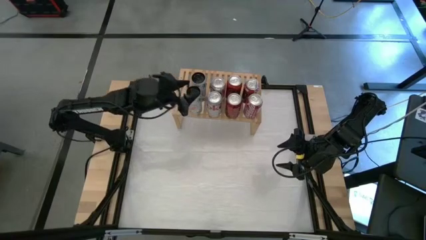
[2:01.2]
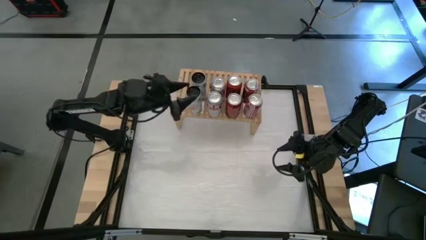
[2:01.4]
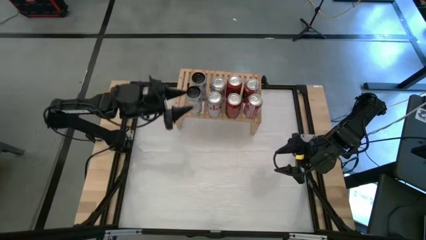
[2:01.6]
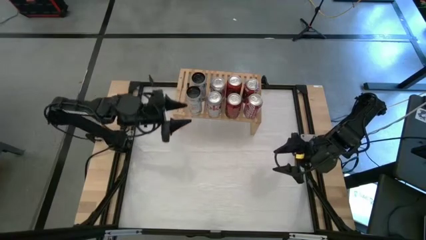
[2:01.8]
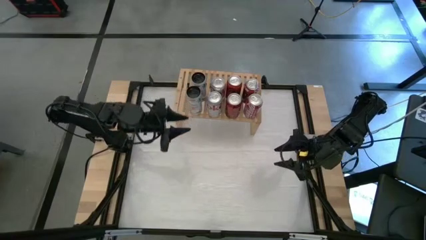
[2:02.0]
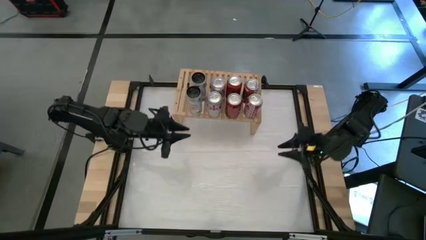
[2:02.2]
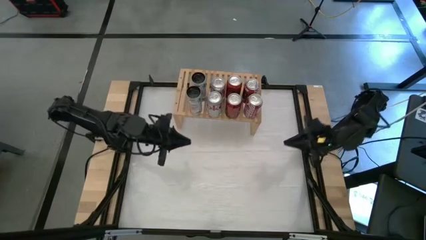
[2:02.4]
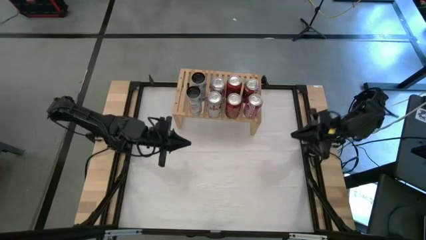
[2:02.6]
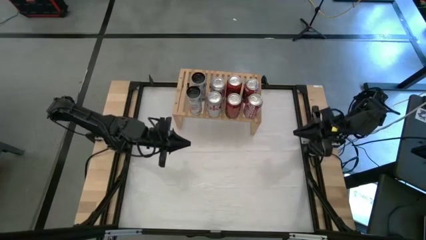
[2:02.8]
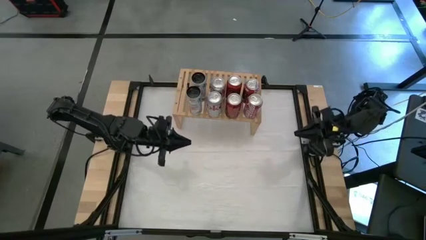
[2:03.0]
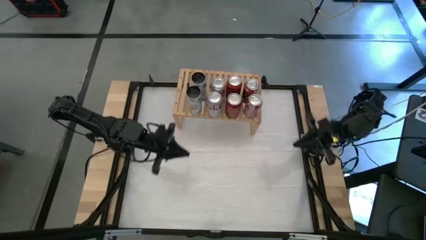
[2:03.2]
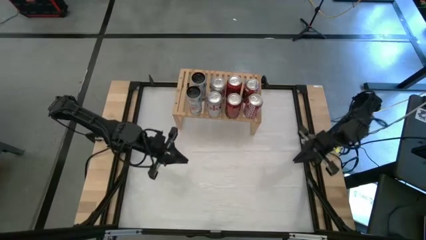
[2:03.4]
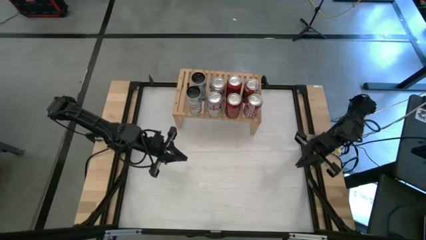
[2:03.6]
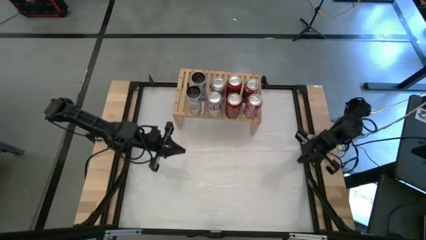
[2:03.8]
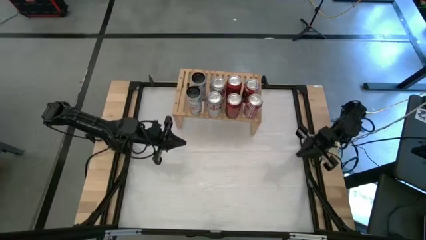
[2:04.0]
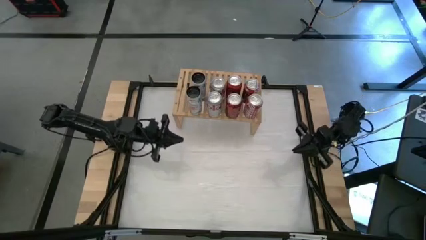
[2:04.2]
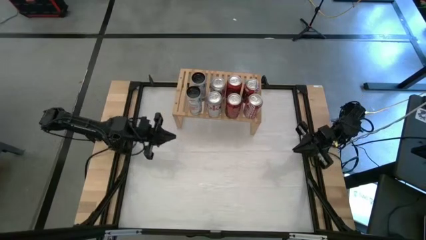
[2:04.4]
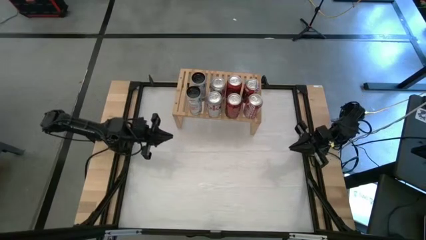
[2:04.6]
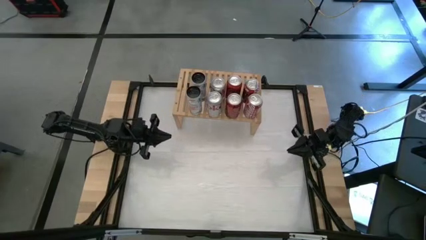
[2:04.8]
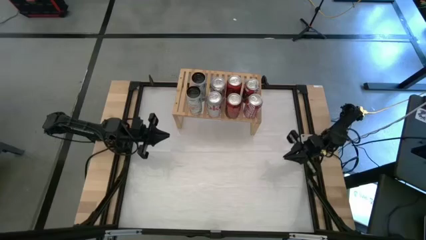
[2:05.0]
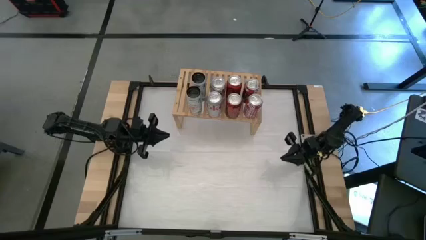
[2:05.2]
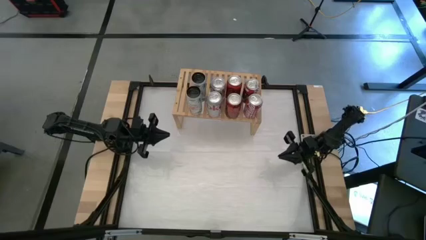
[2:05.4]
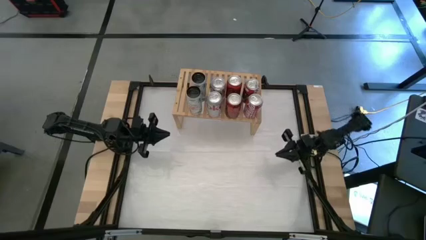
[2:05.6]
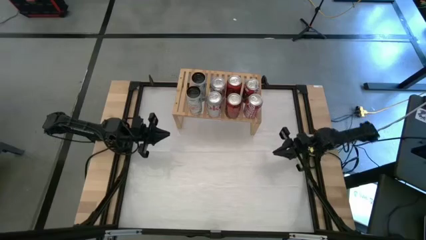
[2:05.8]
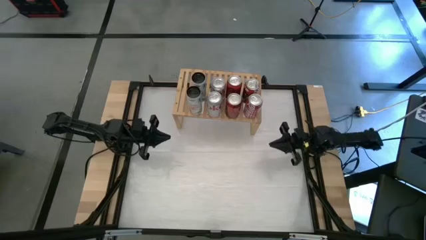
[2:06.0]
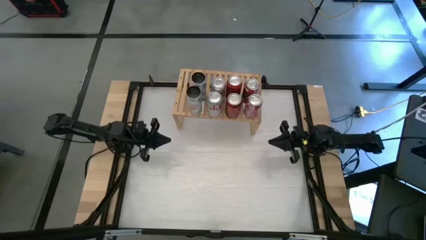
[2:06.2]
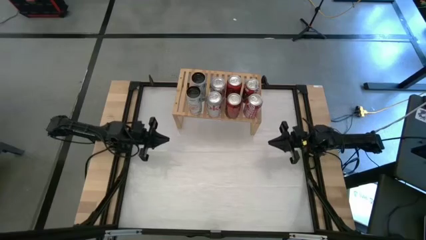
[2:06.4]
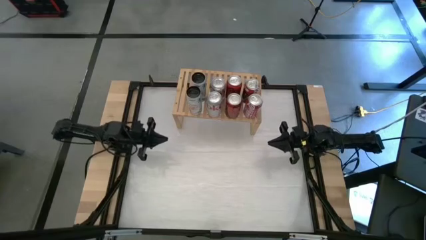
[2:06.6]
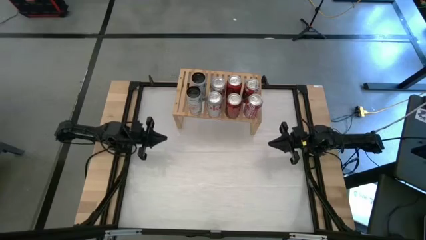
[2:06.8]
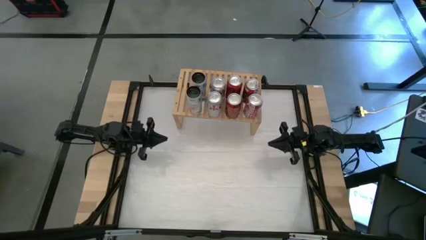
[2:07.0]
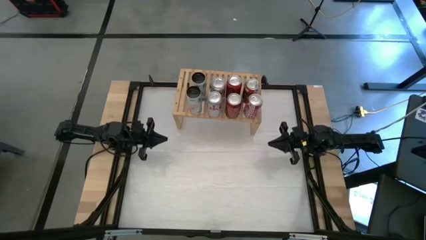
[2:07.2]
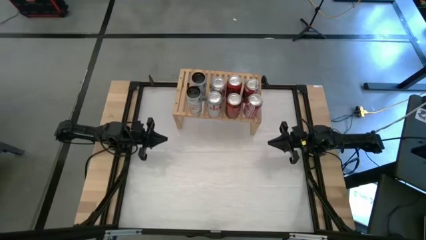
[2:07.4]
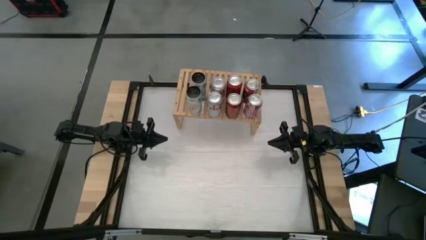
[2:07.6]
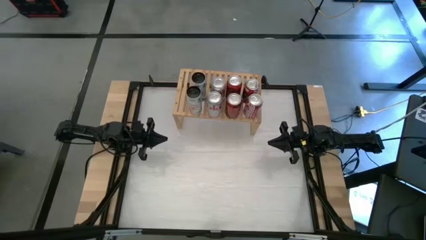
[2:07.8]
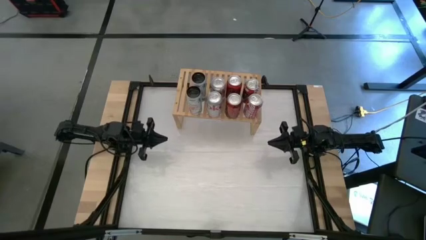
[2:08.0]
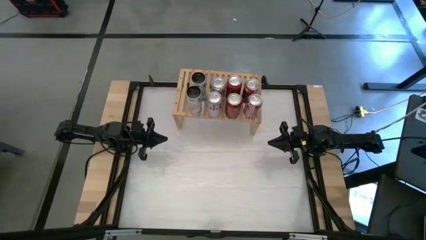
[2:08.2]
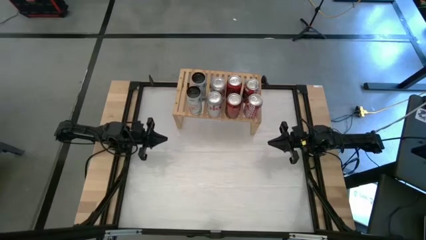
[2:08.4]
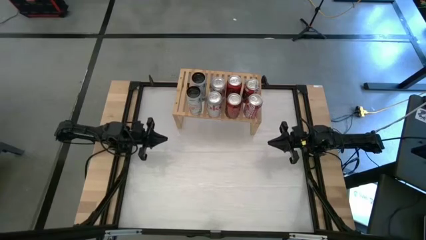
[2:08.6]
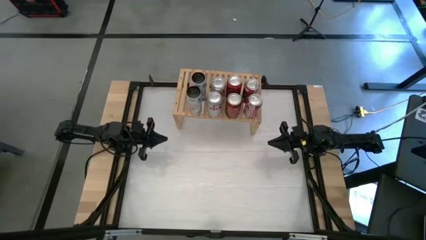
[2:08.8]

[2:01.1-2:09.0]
Task: Place canned beverage on shelf
Return to Home Position

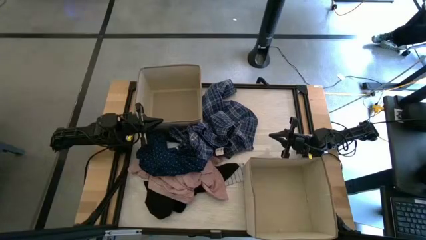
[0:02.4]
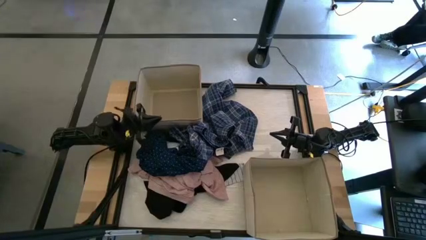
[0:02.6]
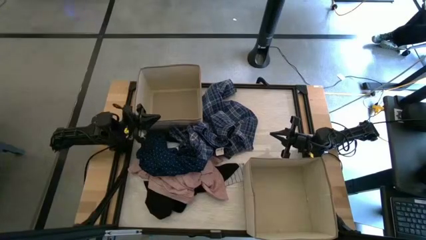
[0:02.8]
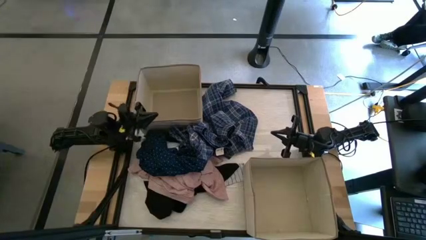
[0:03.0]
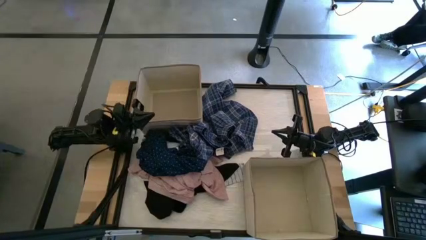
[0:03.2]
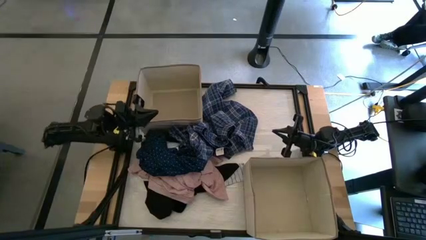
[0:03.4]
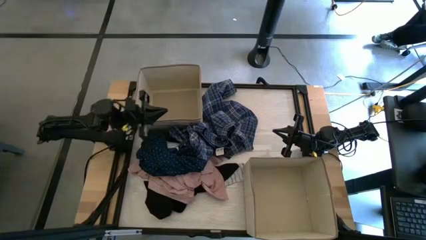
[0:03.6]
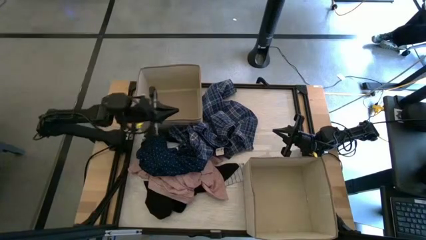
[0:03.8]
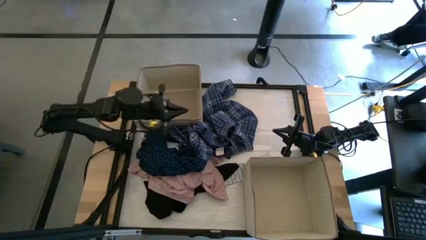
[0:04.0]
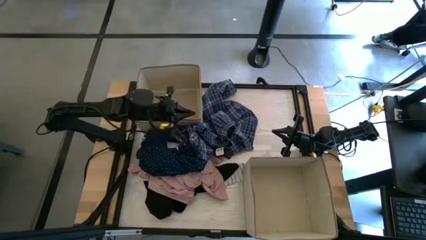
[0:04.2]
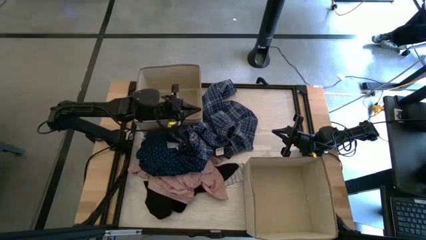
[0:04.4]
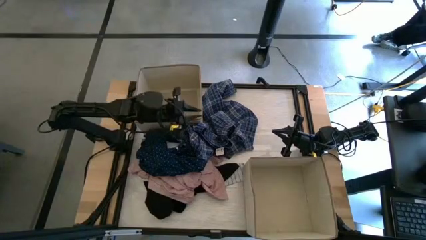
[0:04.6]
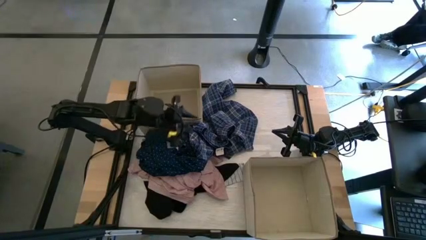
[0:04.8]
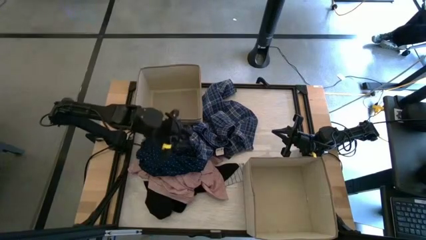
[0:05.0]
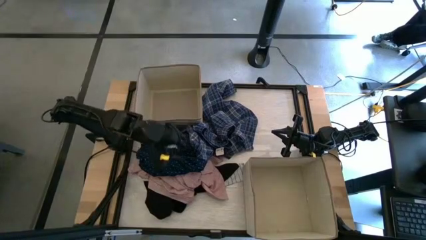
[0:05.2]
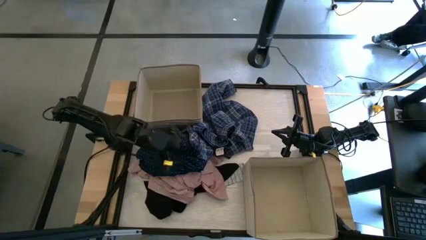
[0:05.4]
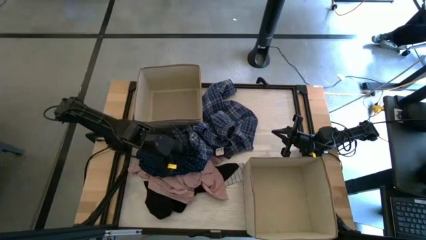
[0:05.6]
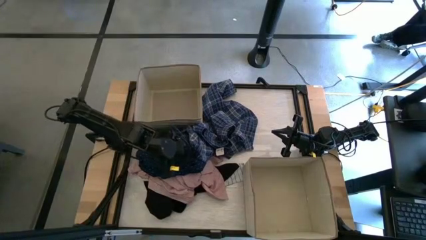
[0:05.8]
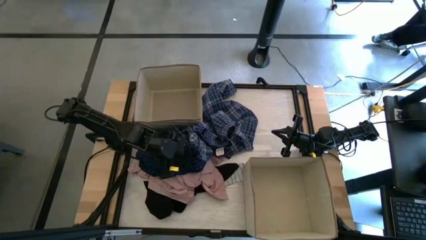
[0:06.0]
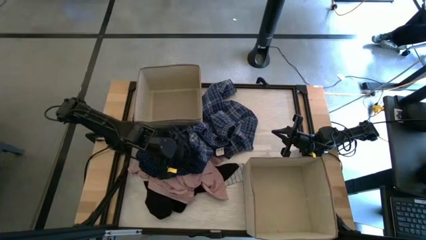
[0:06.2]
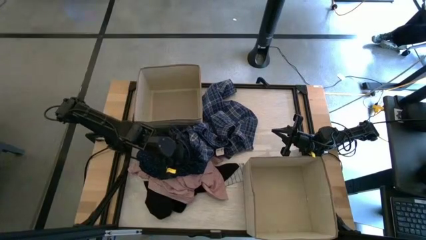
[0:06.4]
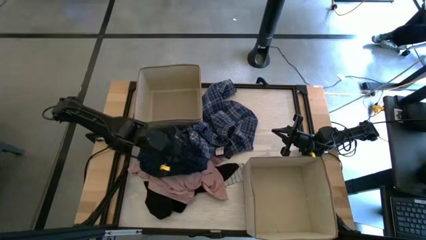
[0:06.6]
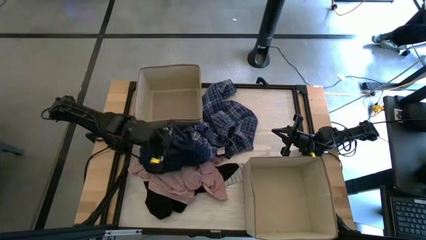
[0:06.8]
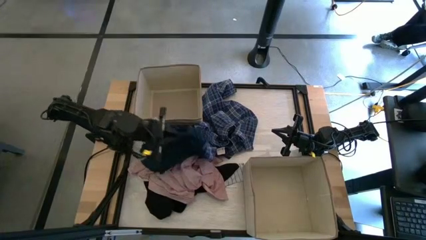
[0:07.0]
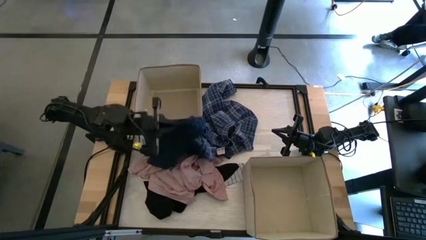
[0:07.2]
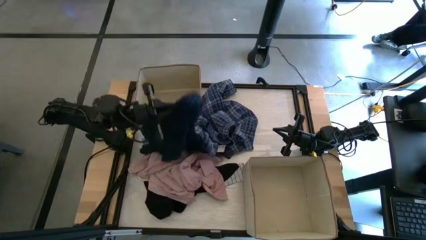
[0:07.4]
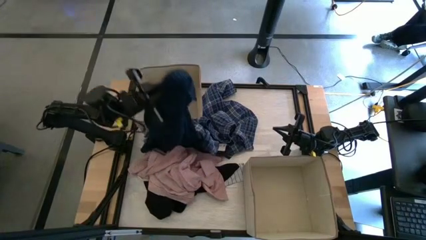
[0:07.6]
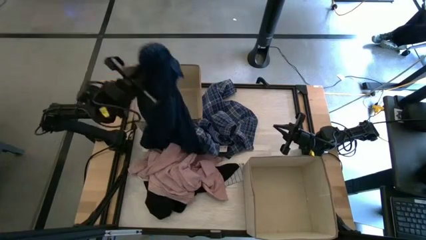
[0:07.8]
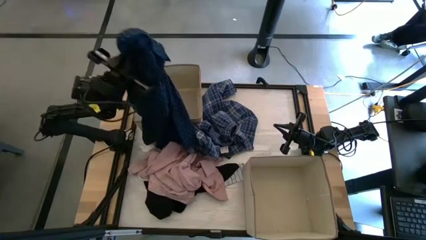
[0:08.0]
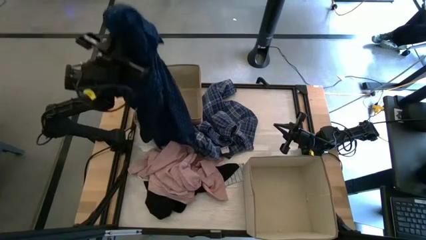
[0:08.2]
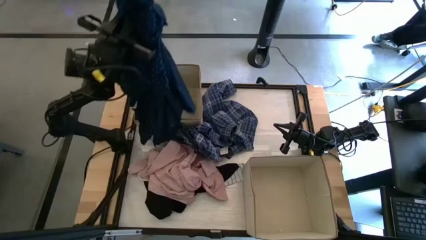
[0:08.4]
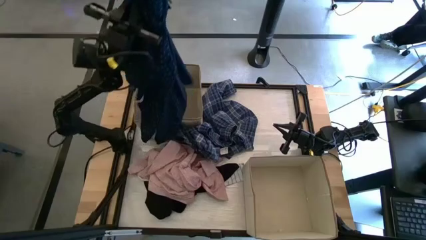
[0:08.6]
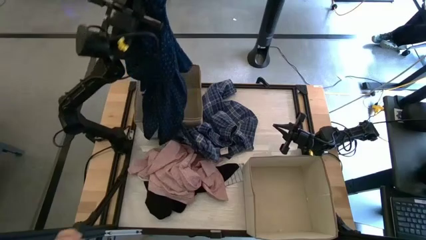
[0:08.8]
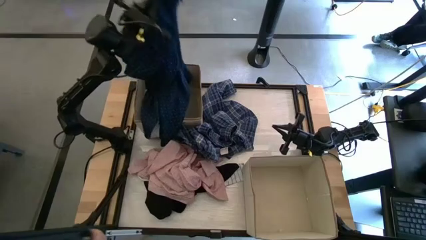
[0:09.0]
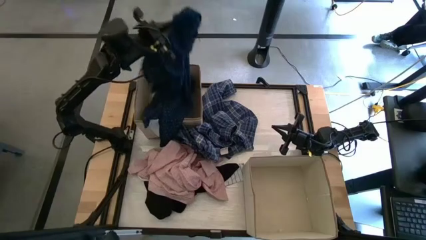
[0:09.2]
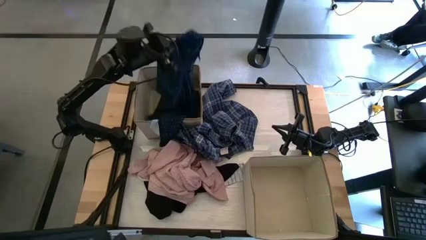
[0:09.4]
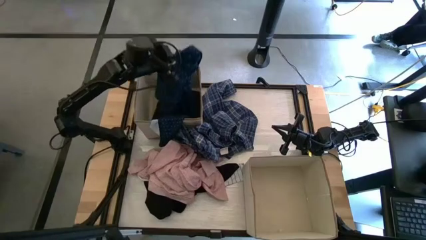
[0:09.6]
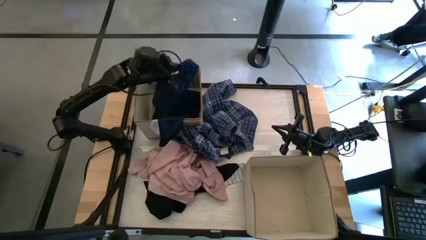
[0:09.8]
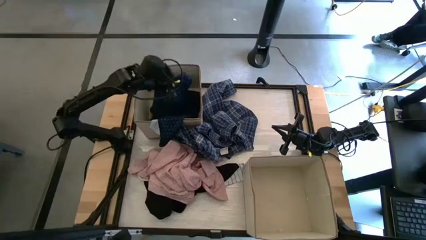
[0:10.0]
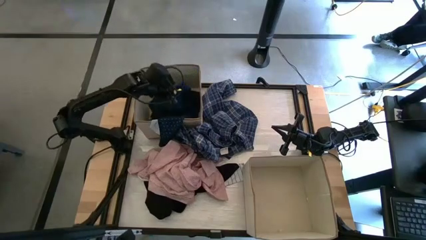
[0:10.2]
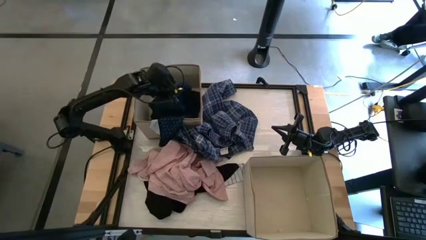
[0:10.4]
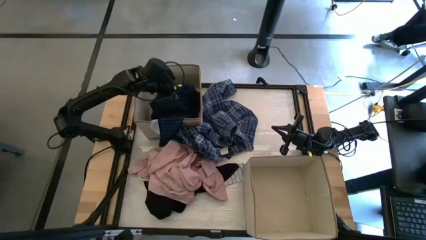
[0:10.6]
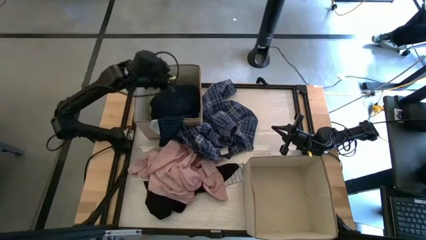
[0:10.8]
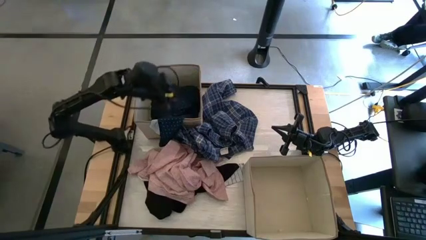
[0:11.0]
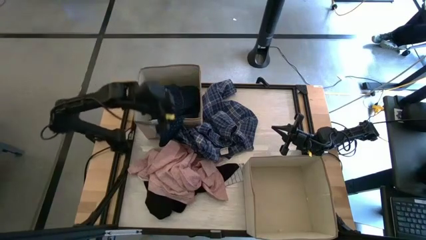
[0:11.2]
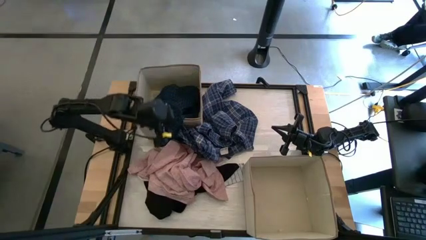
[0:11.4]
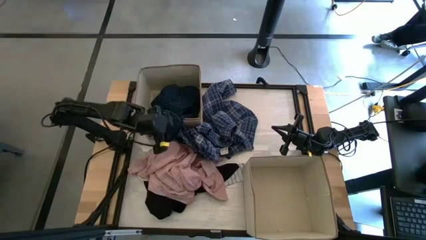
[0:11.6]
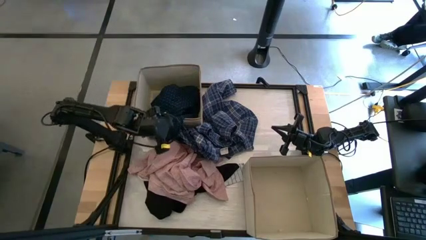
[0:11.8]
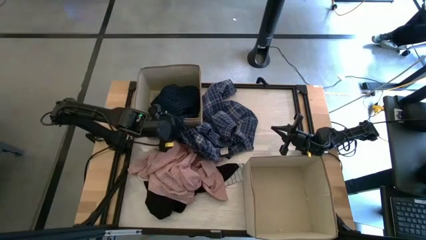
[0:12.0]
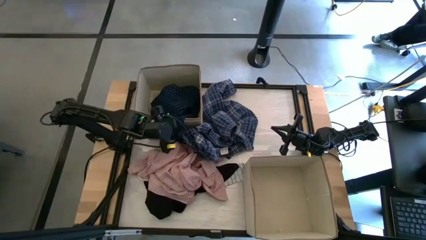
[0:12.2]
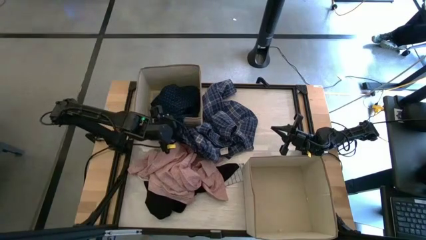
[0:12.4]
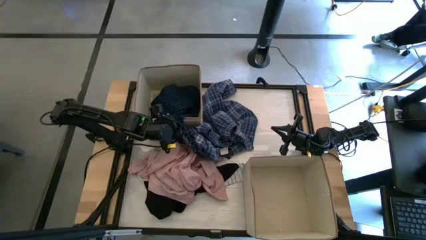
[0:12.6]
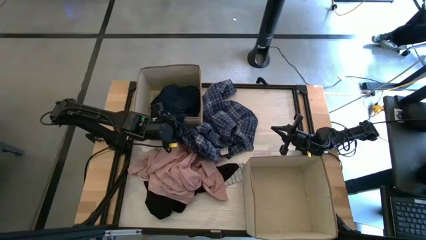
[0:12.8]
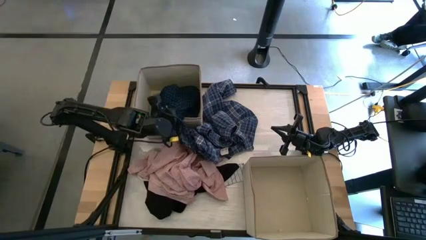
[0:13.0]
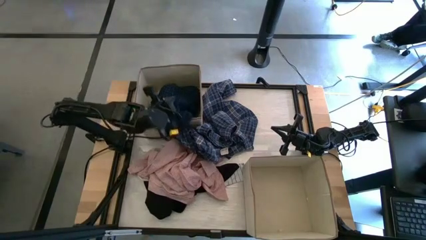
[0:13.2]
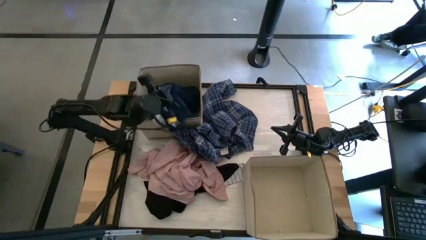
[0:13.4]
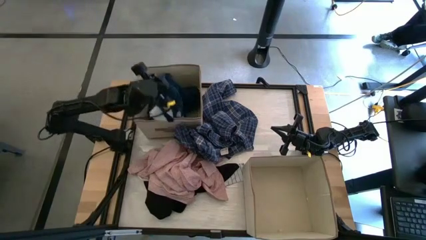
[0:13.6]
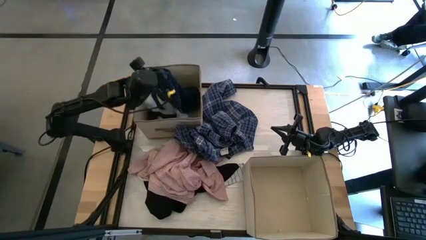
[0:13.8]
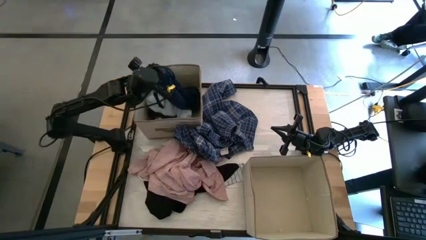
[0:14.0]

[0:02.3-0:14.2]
Task: Sort clothes
Put the blue sleepwear into the top white laundry organizer
